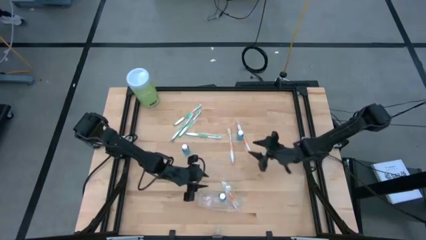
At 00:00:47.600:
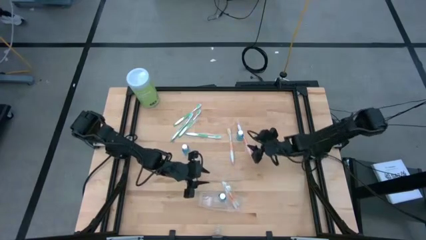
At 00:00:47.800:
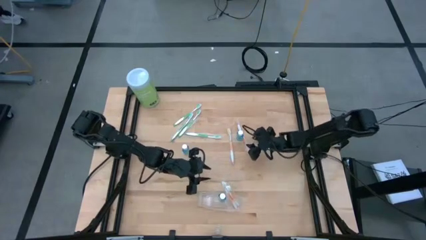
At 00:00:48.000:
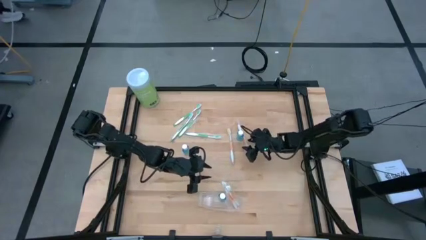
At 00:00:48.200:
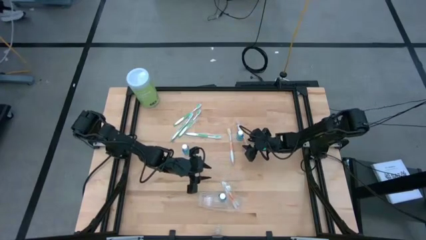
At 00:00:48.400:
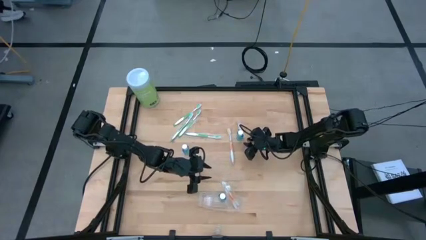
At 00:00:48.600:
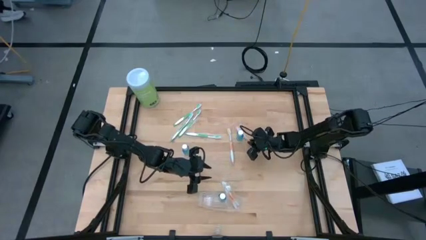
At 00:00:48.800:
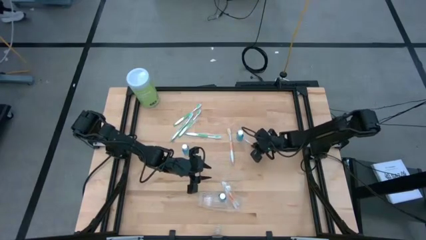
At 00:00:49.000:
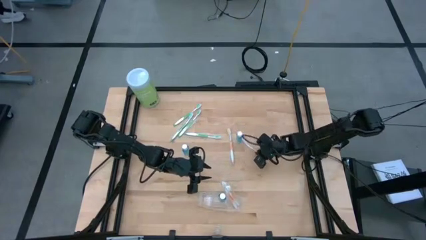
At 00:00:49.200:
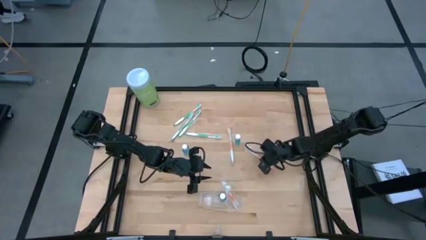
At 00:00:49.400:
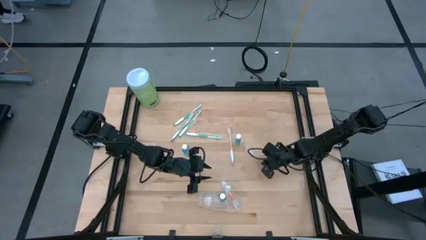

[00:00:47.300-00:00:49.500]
Task: Pick & Place toothbrushing station
Put the orange toothbrush into the transparent organizer

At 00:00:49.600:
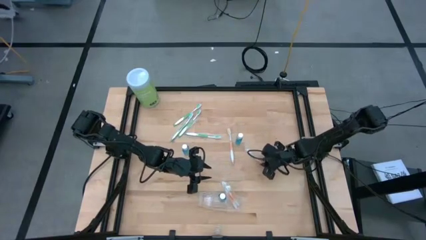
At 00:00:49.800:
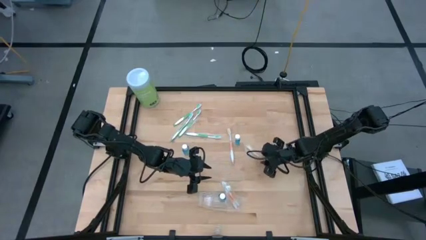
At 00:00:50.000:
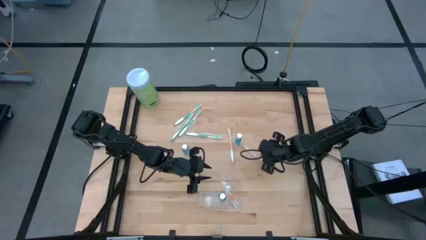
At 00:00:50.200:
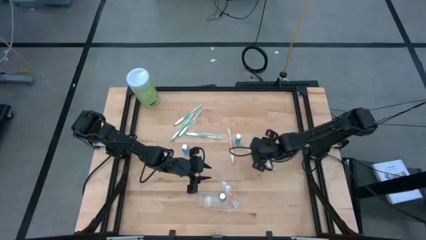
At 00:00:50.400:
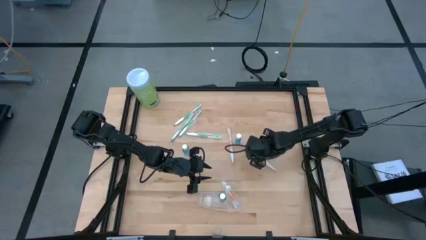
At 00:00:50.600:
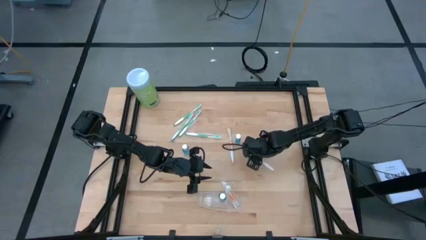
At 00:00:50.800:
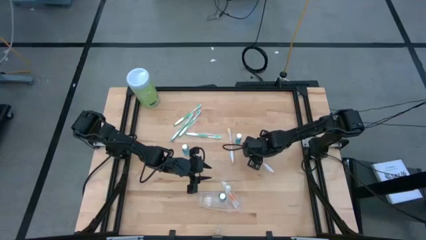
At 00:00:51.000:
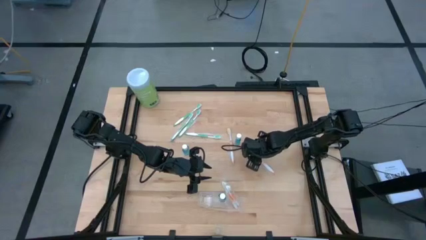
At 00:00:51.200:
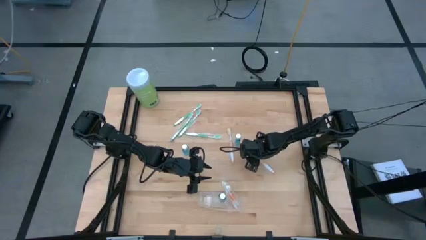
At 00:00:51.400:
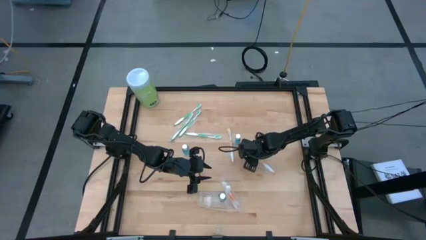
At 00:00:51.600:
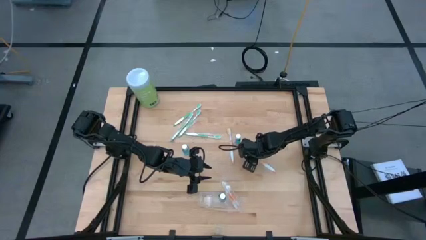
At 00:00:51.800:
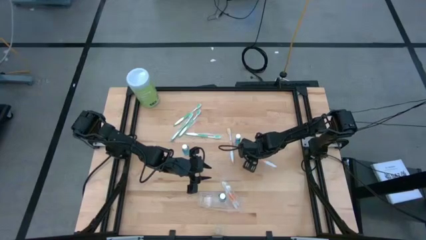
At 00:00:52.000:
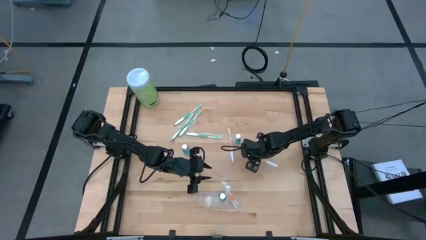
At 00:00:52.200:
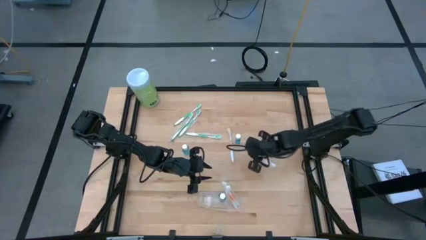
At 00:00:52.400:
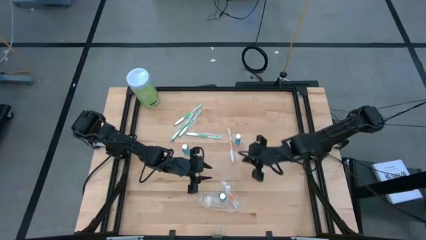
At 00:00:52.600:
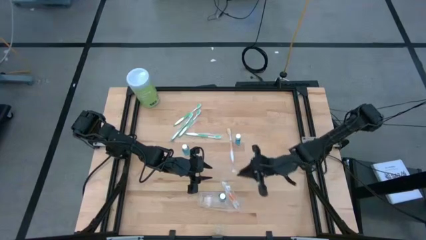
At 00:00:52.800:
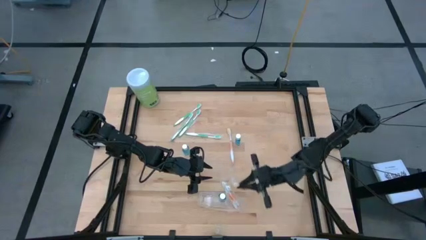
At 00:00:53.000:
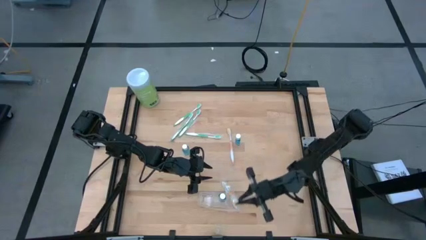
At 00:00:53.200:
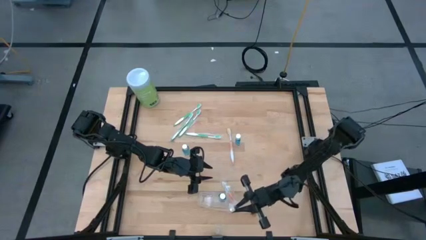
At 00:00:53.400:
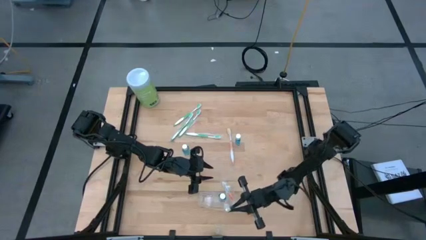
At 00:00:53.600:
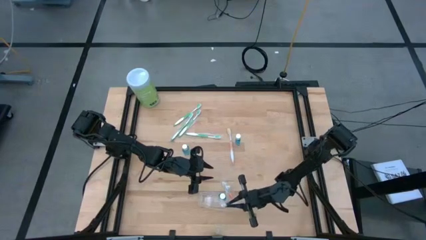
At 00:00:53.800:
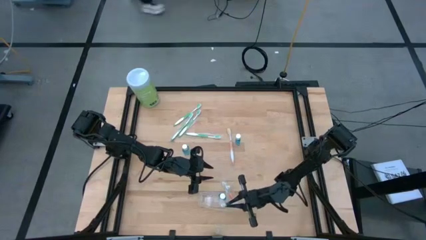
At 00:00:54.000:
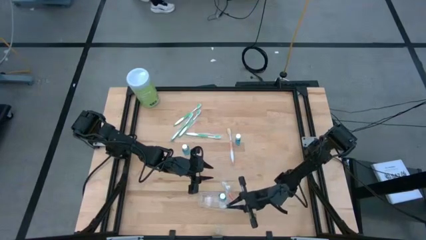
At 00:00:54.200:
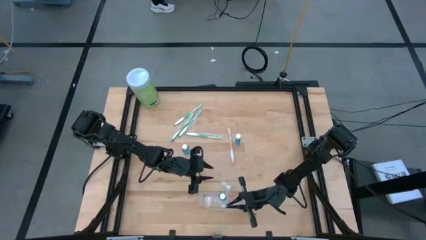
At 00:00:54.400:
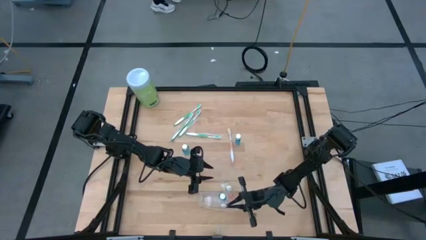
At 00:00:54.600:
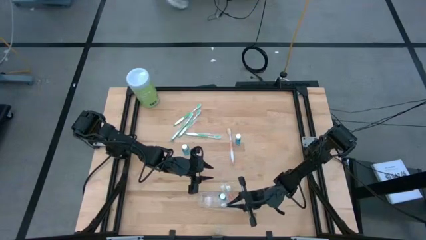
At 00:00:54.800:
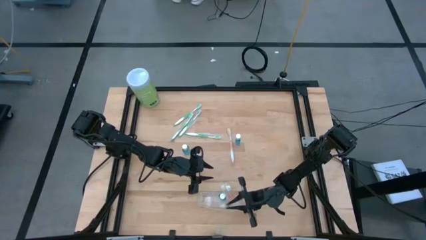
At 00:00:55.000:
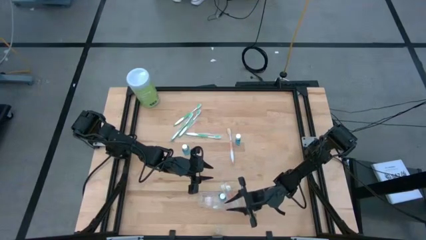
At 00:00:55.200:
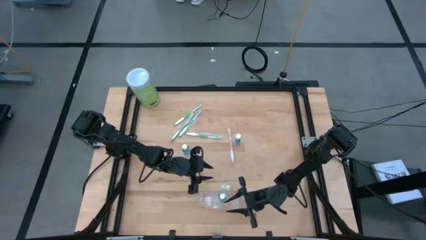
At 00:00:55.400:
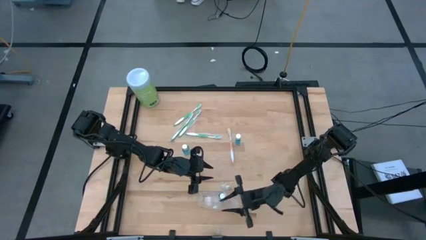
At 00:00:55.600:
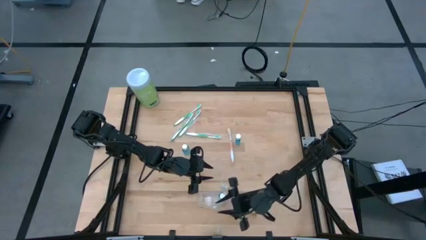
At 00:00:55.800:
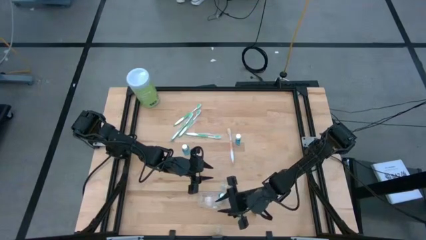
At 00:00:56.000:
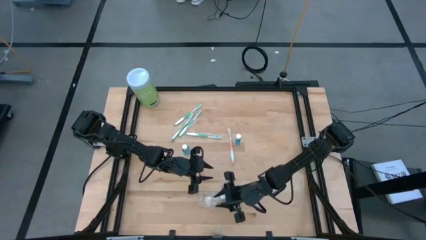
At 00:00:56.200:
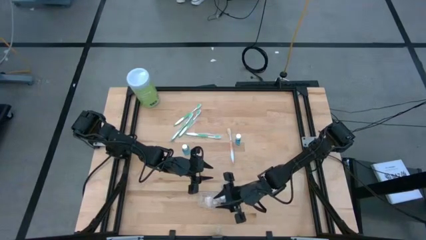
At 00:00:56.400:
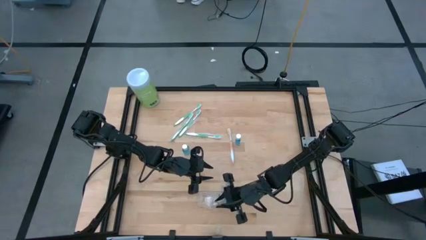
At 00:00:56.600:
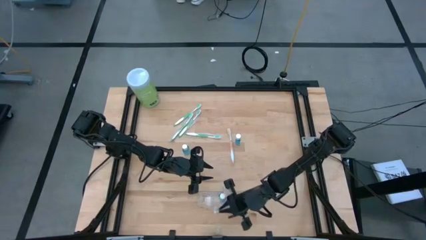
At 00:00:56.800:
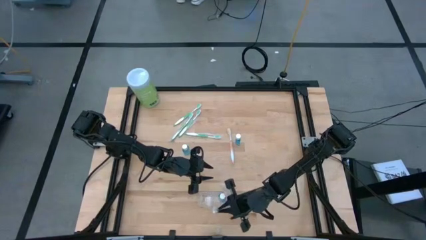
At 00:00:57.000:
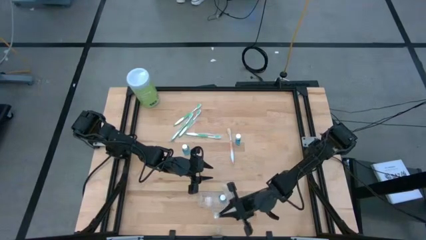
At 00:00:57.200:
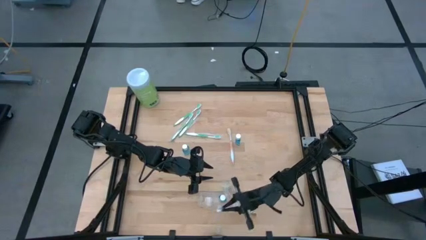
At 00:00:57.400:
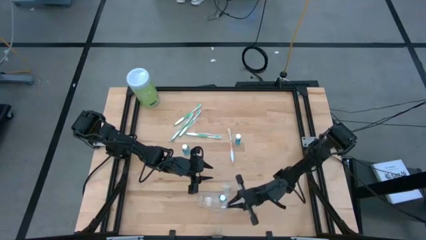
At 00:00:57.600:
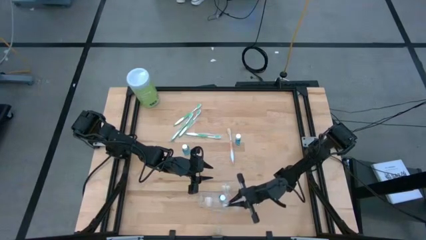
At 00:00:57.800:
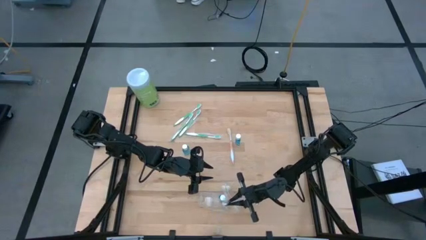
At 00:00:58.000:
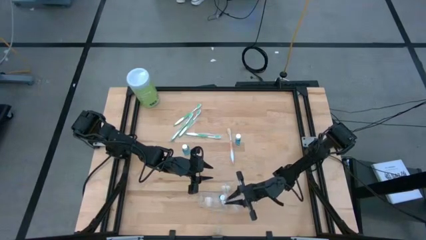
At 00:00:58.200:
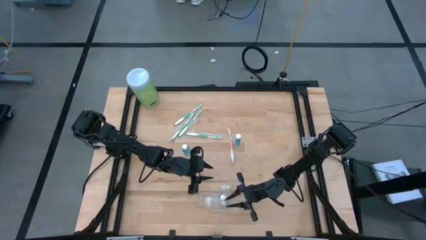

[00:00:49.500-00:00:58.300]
Put the orange toothbrush into the transparent organizer

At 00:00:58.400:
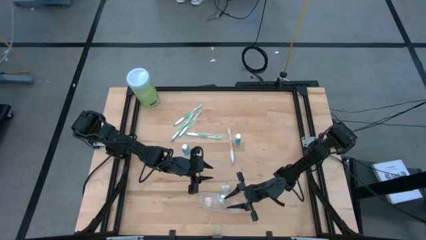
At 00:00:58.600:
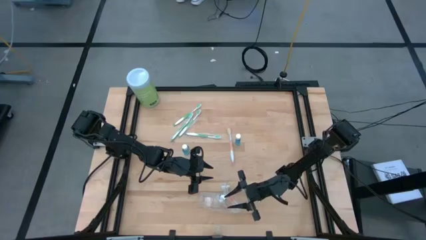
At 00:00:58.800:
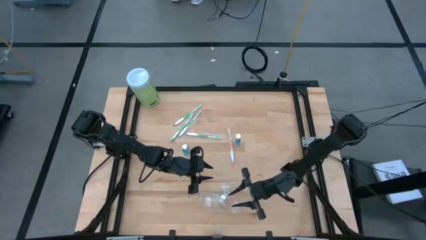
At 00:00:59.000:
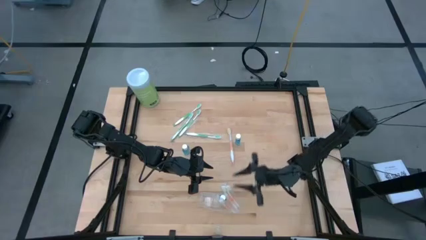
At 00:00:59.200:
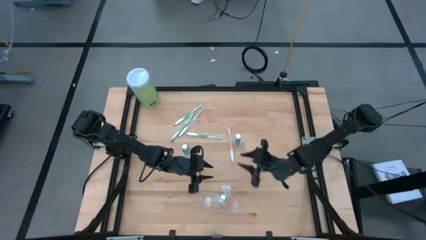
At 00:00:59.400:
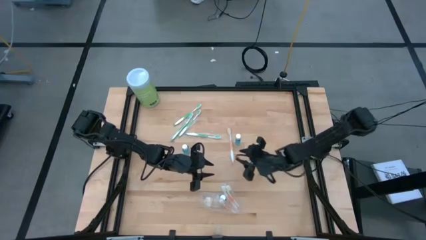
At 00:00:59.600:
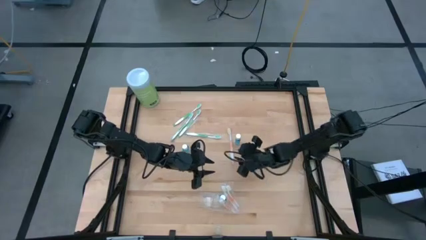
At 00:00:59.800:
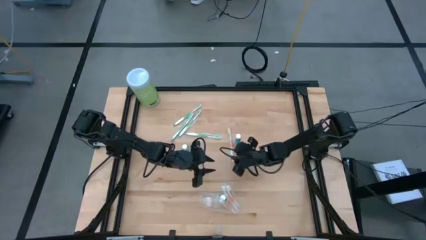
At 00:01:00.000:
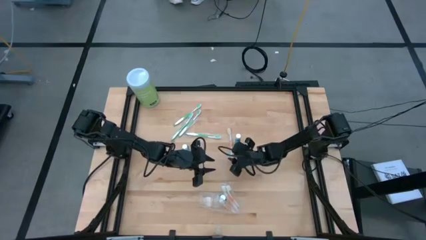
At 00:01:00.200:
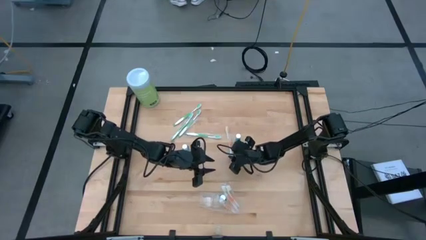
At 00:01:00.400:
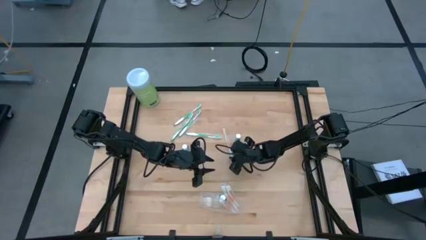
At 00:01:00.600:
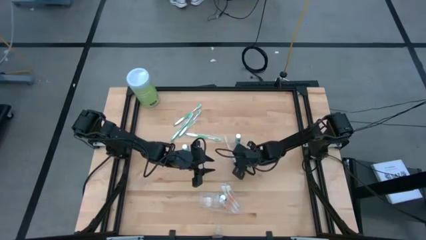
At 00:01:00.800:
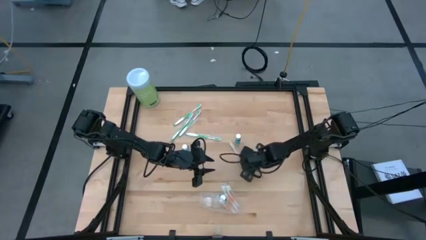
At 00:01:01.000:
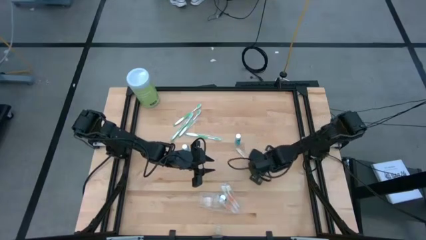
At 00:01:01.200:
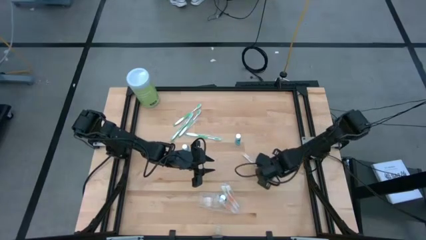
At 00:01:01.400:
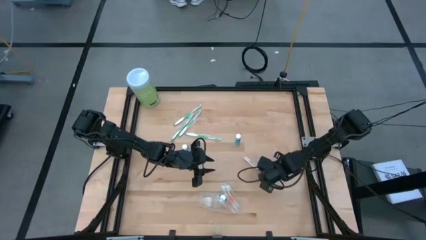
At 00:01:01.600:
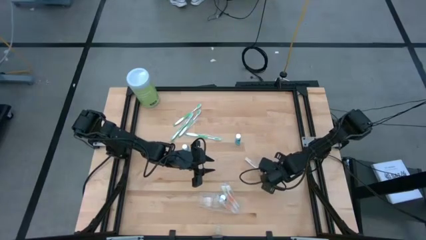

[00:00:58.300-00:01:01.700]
Put the orange toothbrush into the transparent organizer

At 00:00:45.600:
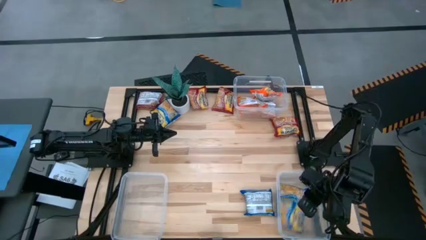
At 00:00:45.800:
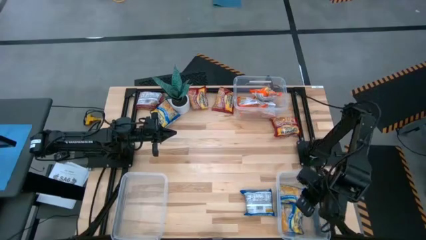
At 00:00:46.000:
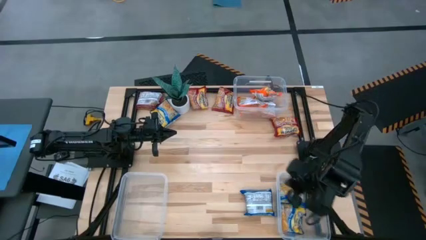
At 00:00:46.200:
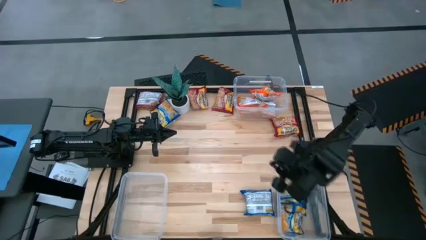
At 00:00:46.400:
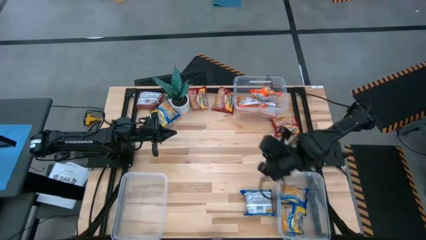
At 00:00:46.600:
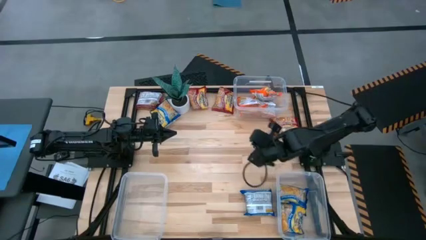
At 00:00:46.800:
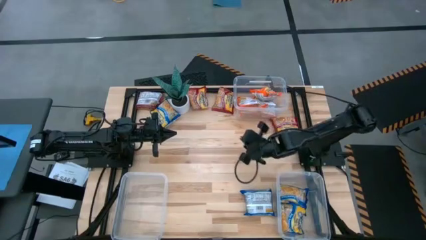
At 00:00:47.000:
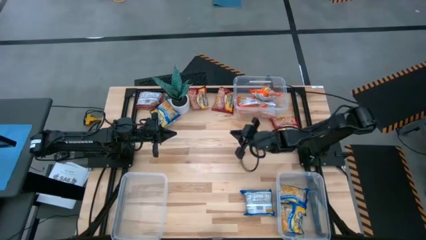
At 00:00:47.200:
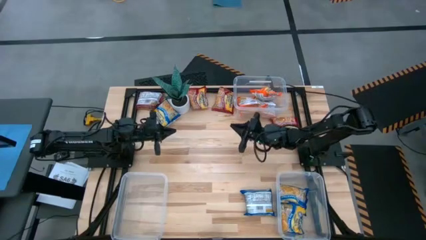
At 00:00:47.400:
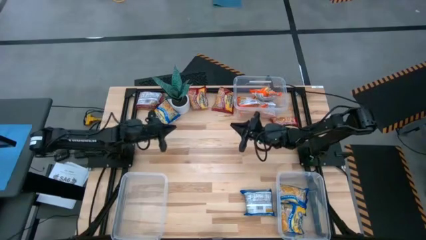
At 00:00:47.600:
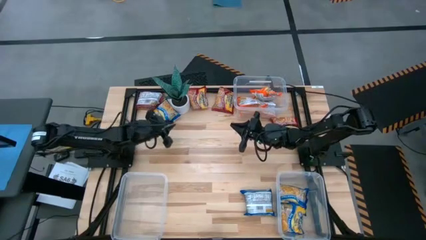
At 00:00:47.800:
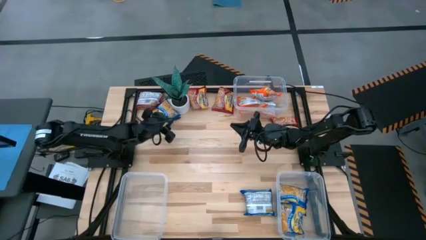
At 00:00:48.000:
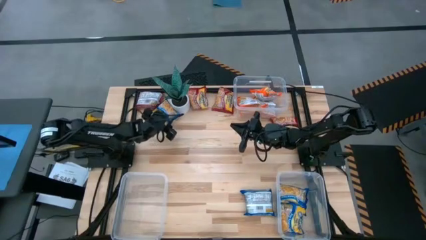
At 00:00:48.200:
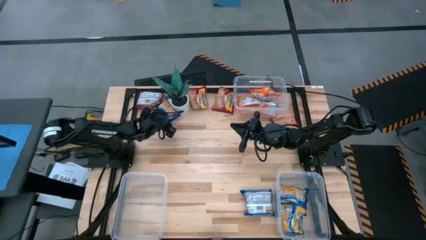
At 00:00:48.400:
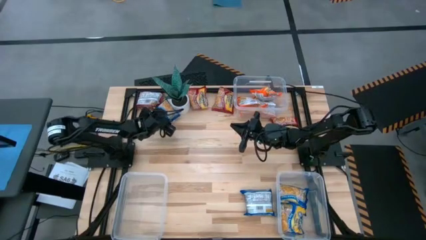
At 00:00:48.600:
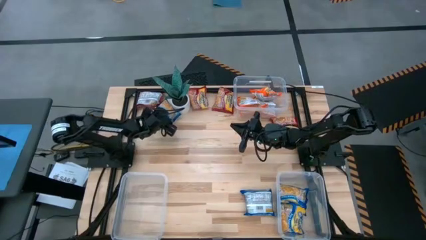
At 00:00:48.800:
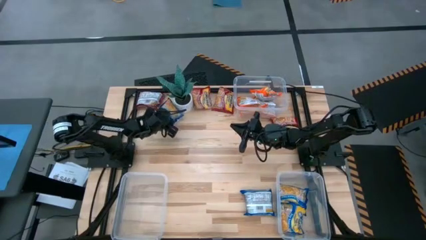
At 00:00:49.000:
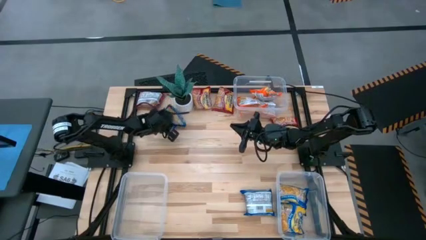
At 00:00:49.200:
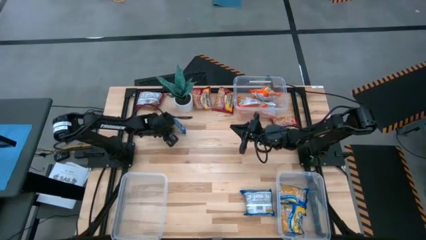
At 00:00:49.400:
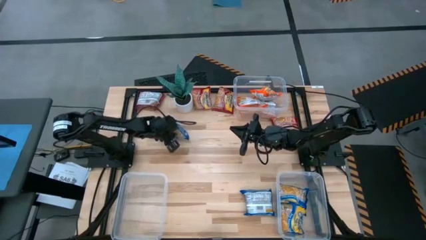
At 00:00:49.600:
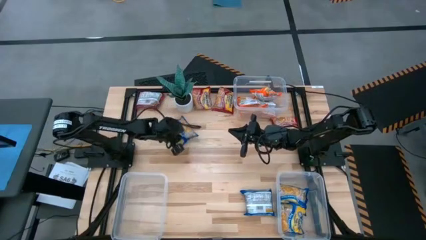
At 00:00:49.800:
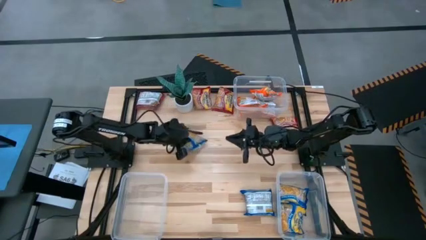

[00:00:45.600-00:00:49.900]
Task: Sort Maruchan noodles
Put the blue noodle pack into the bottom right transparent bin
